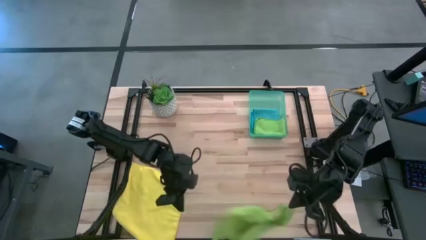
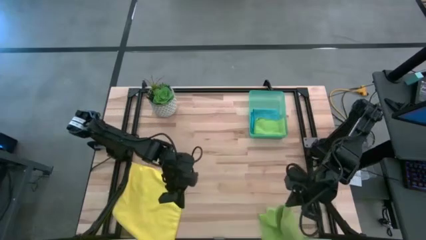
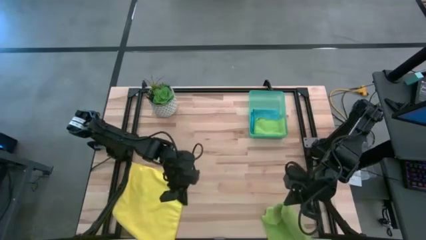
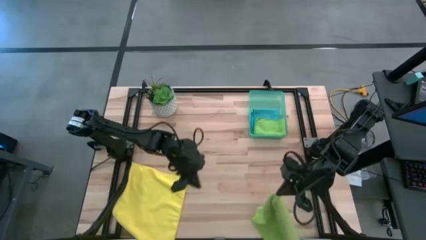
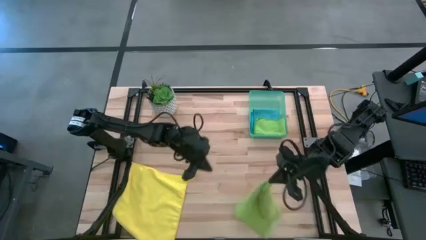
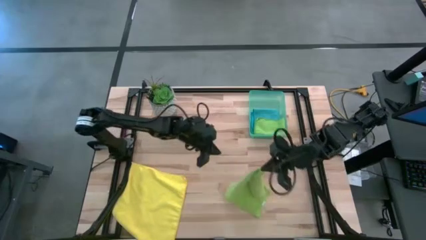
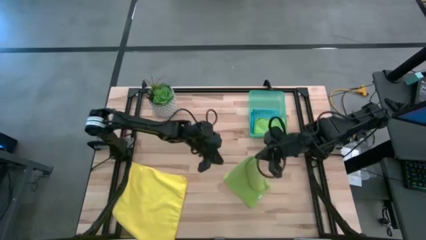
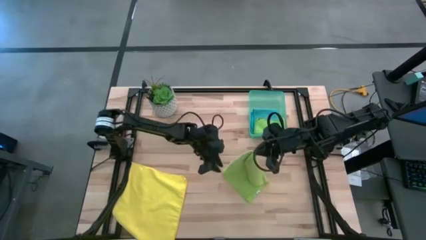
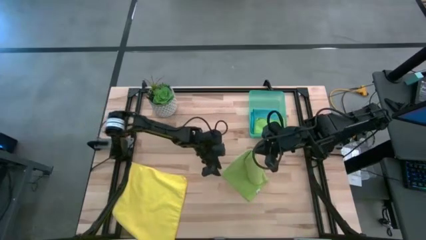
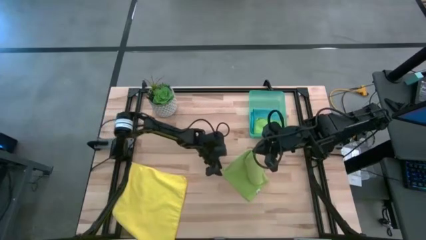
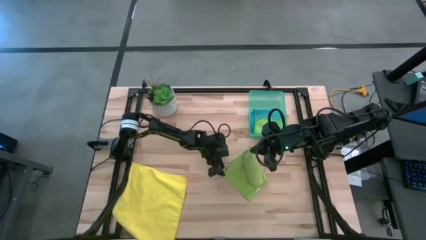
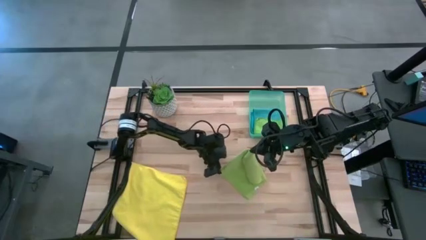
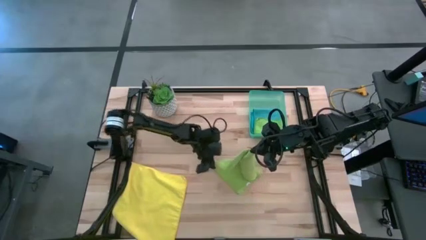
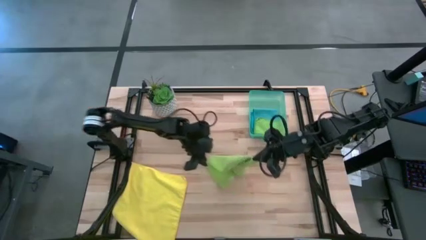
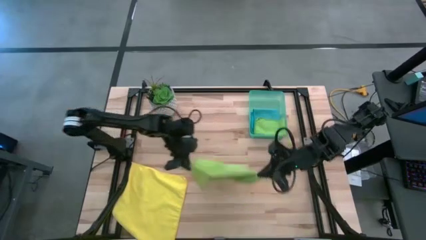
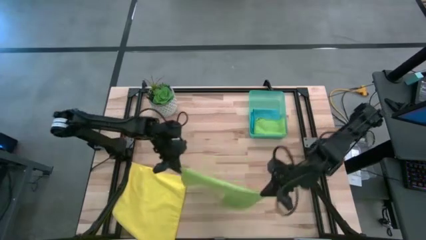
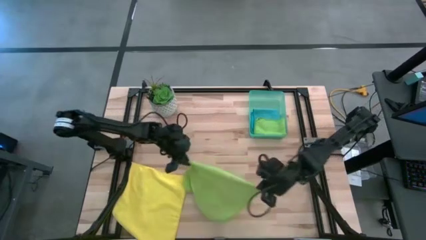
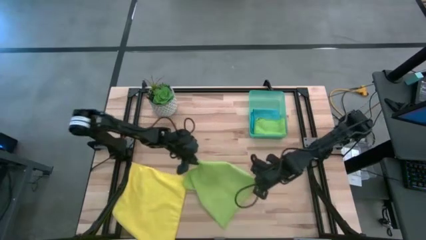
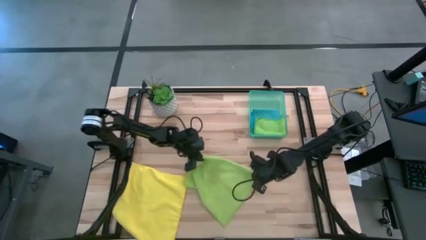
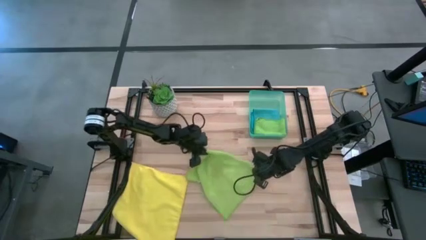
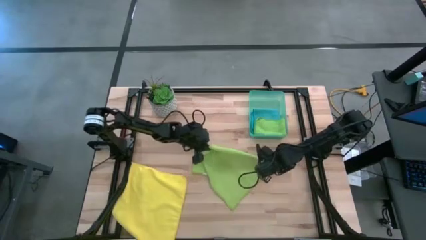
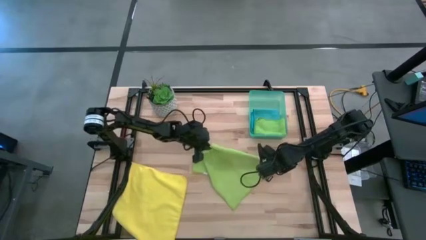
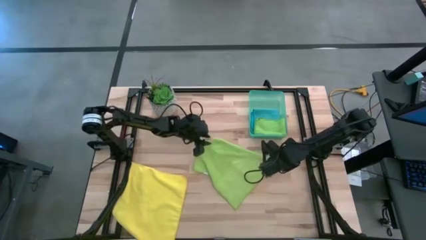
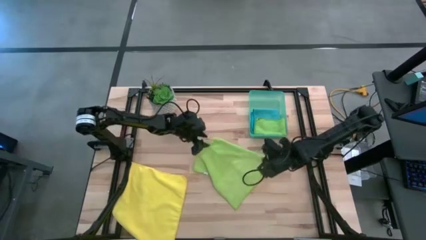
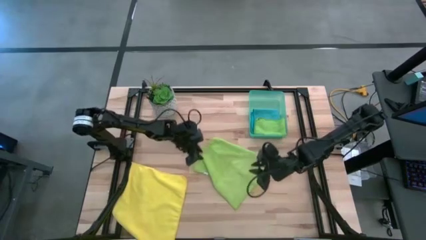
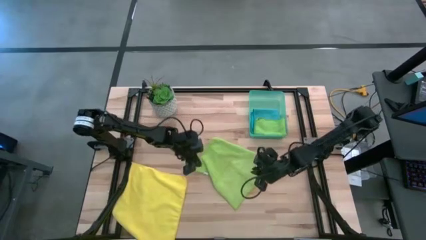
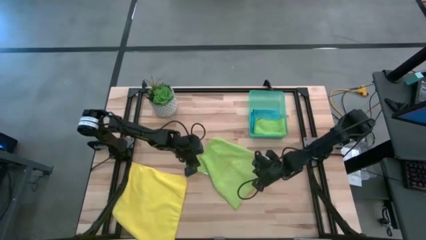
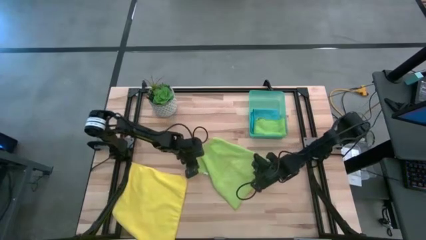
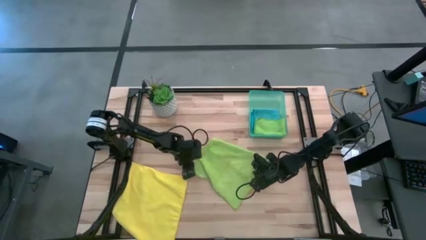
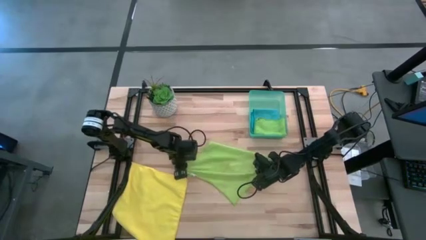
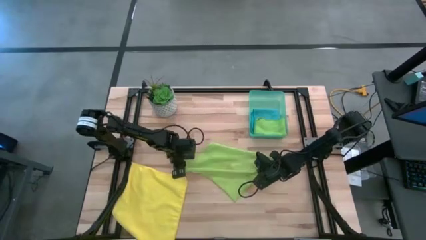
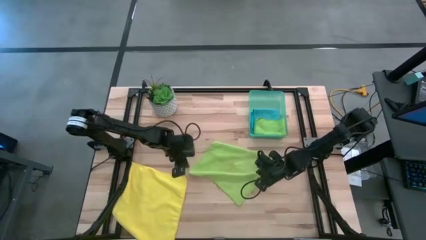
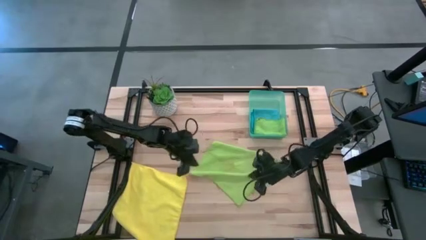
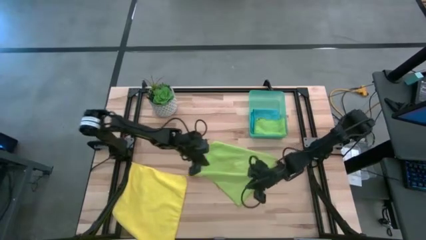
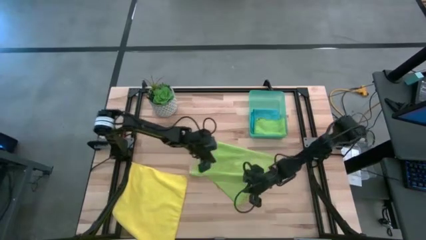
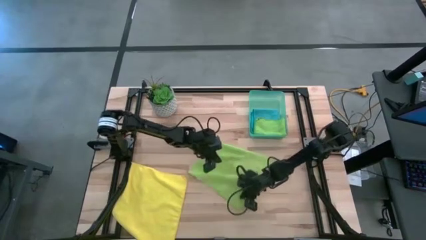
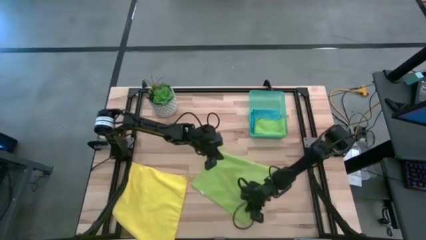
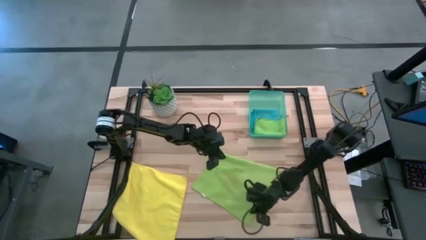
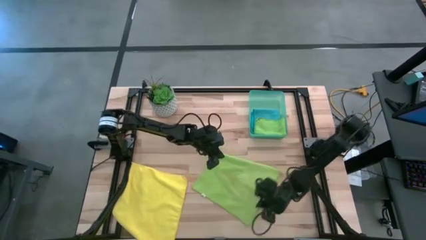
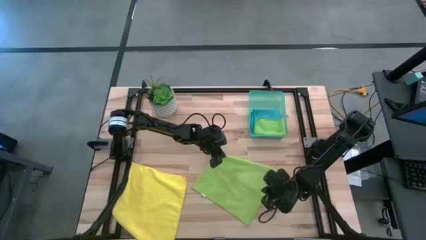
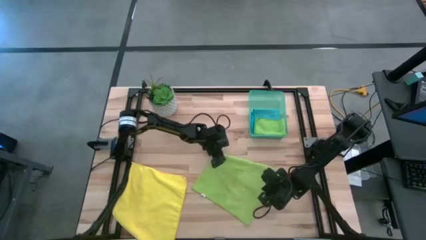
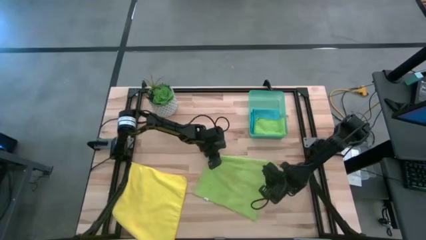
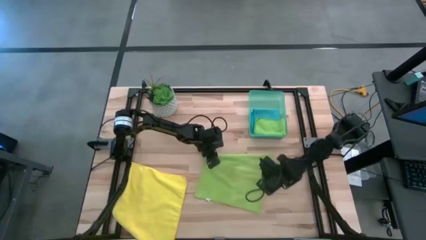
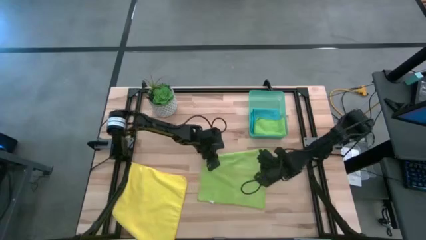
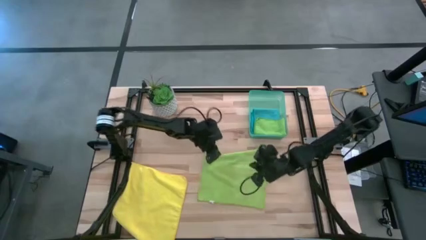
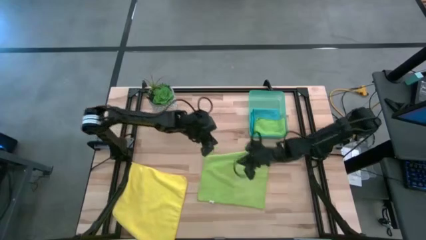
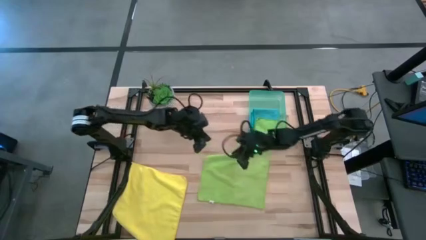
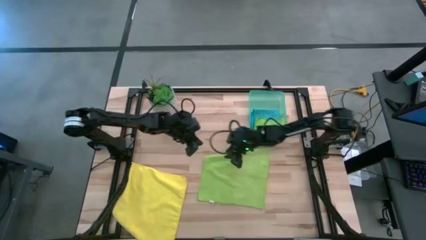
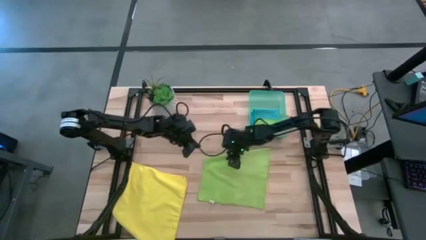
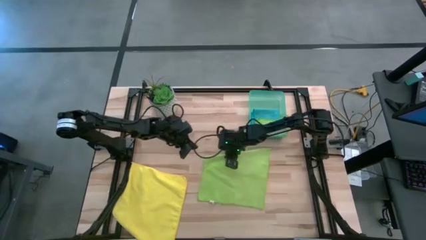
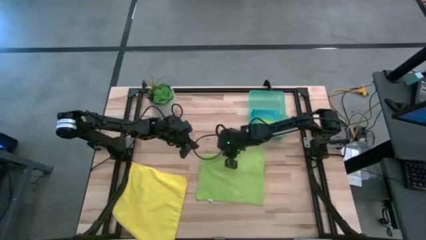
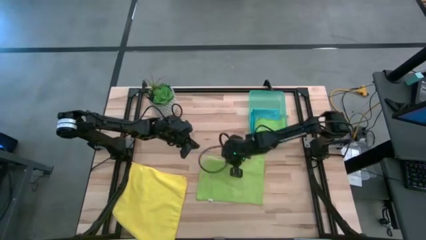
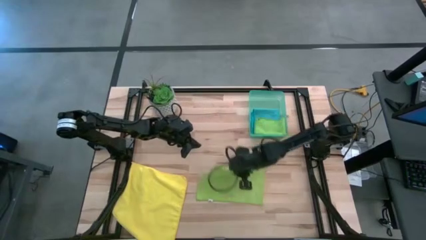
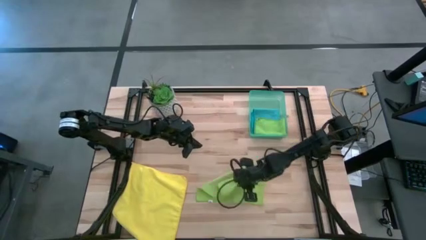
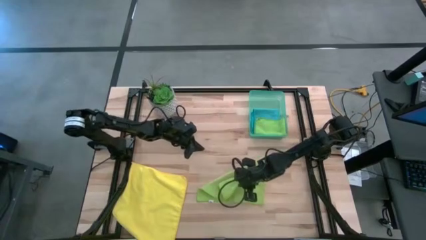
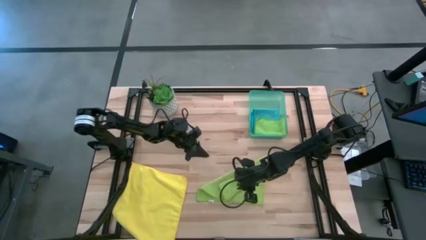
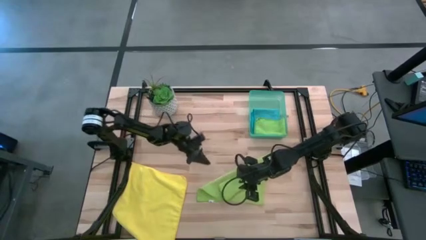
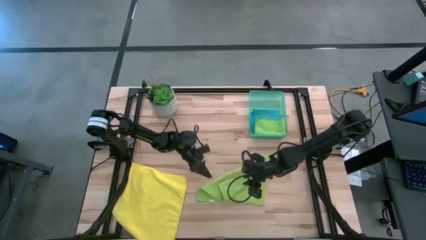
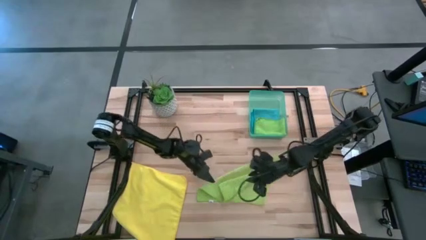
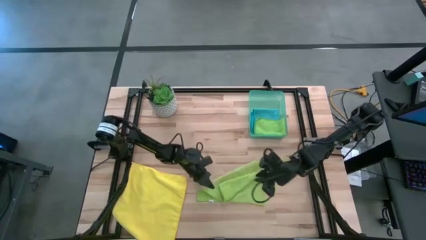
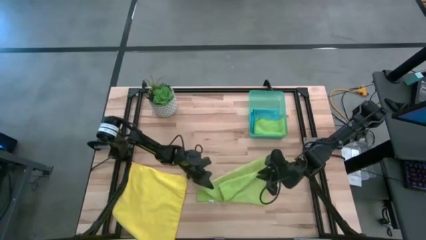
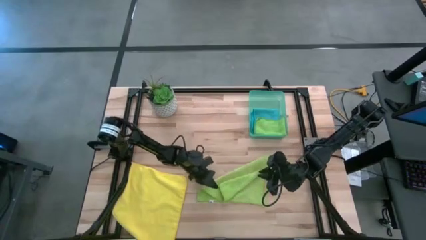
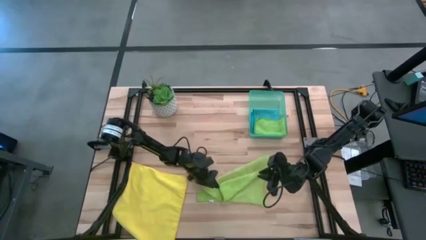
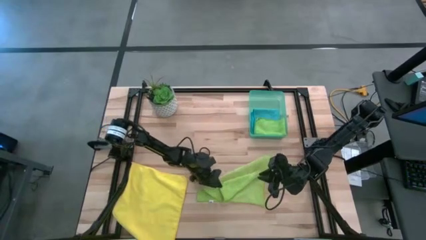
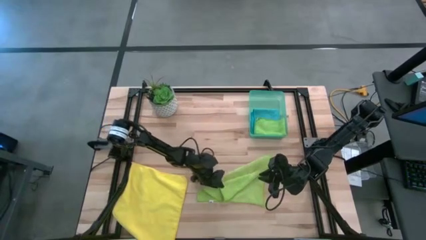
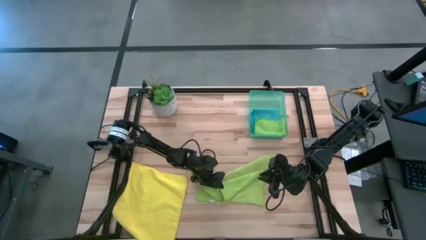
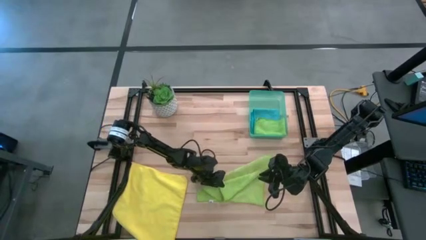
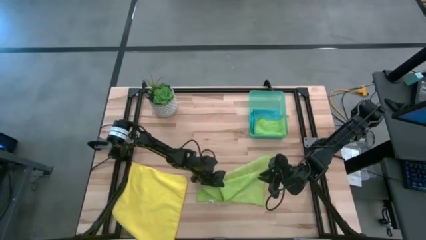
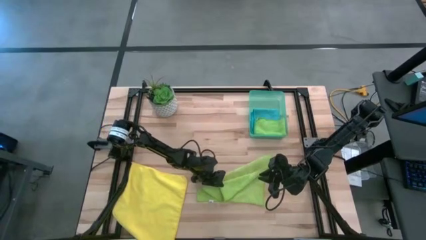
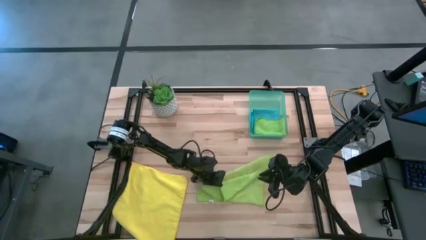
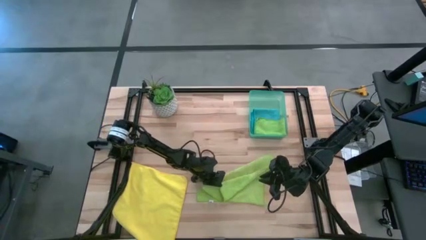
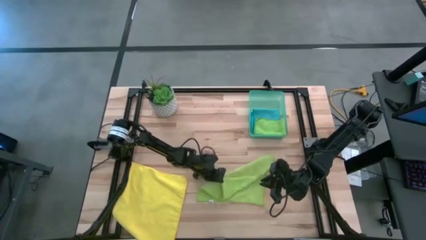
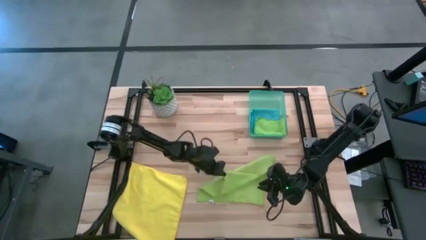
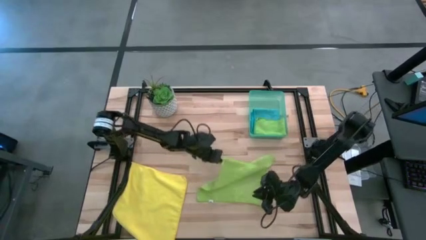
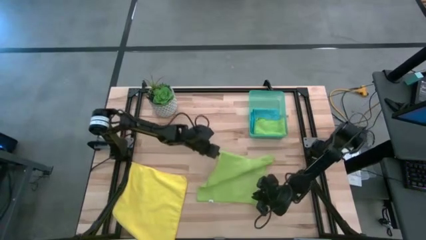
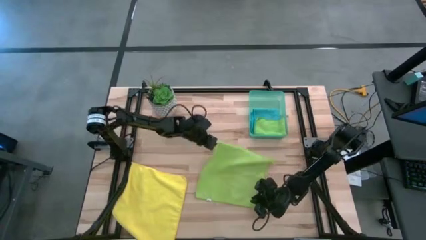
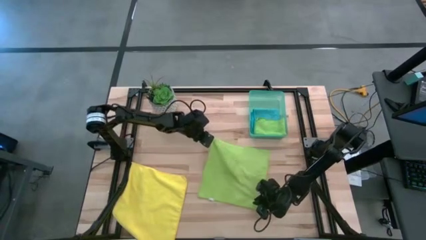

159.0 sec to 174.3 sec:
Task: Fold microfiber towels
Fold the light green towel
